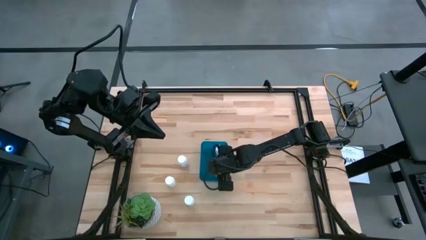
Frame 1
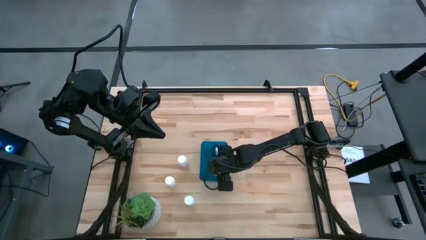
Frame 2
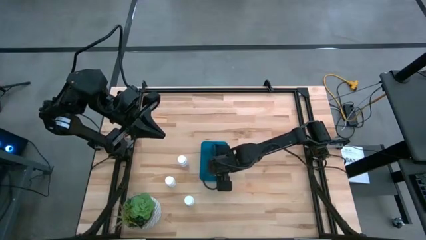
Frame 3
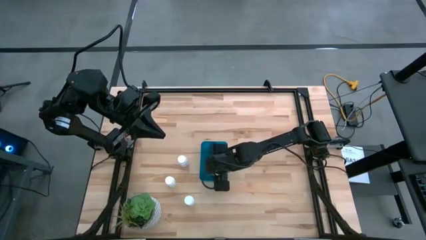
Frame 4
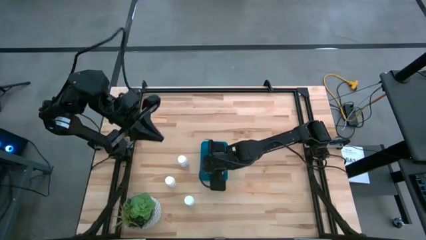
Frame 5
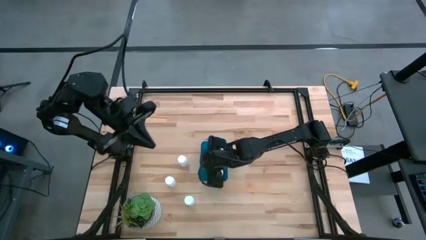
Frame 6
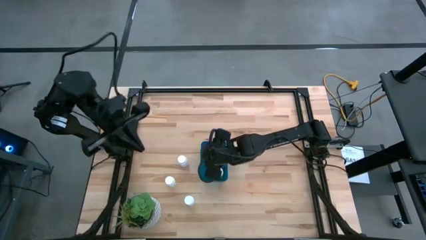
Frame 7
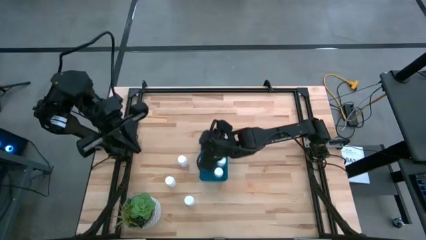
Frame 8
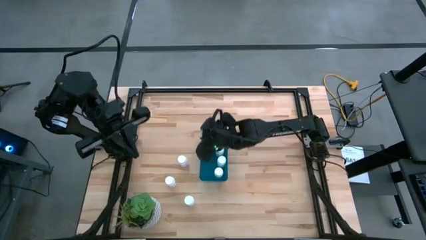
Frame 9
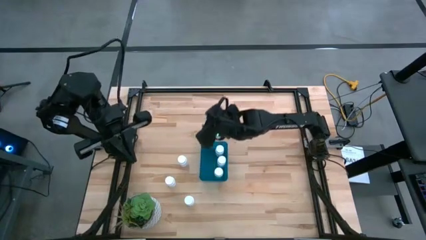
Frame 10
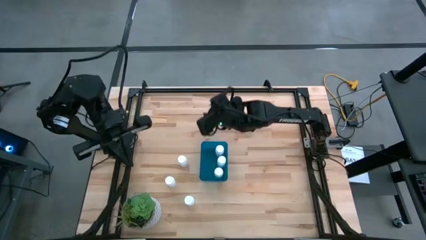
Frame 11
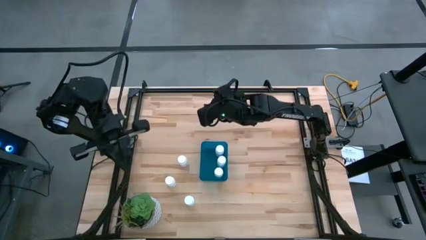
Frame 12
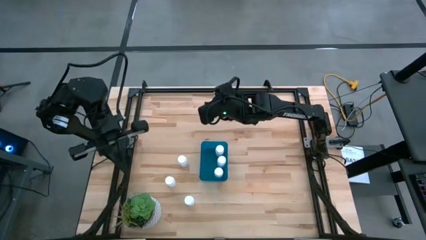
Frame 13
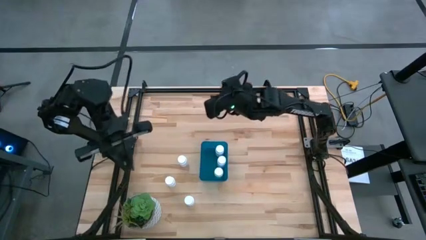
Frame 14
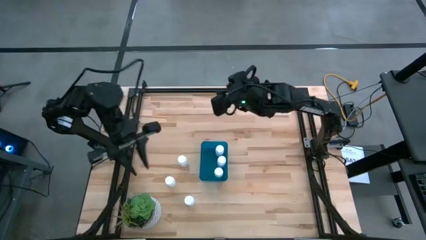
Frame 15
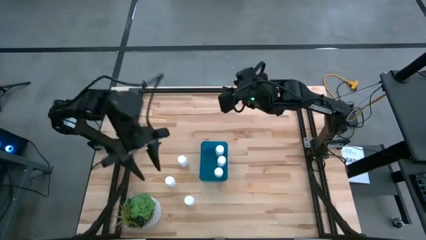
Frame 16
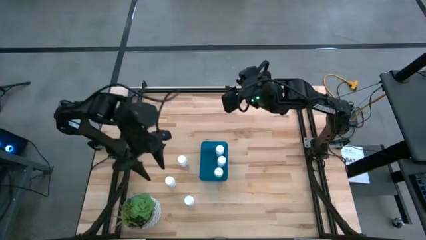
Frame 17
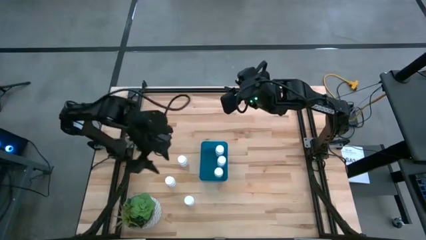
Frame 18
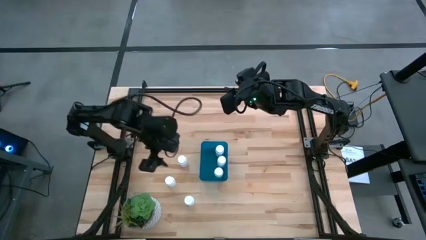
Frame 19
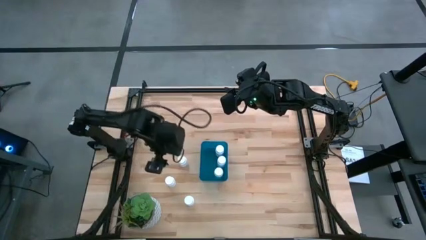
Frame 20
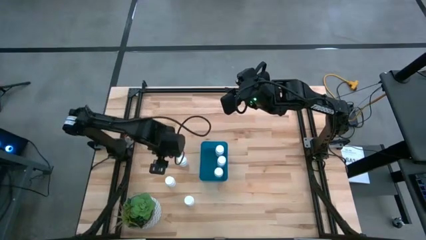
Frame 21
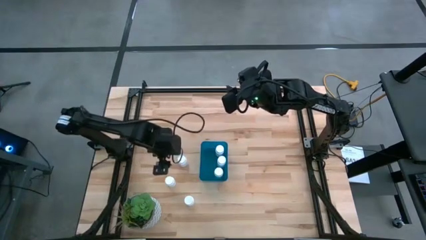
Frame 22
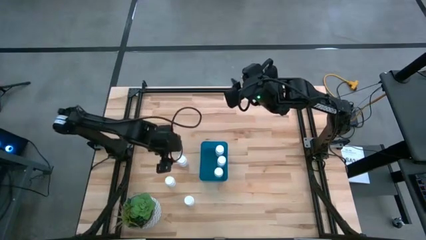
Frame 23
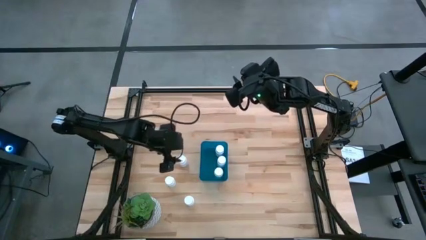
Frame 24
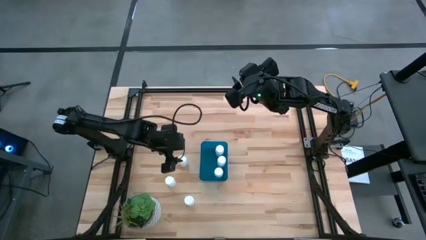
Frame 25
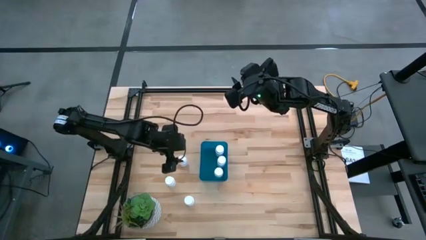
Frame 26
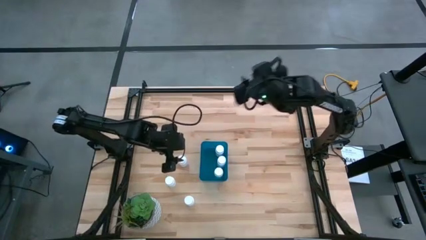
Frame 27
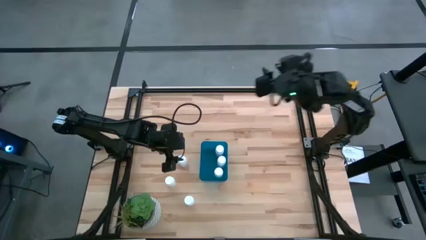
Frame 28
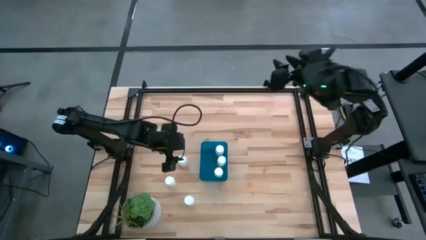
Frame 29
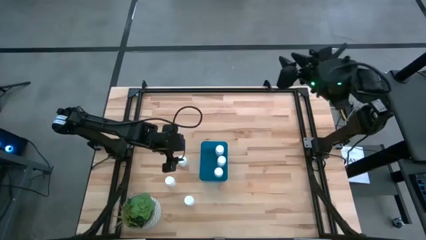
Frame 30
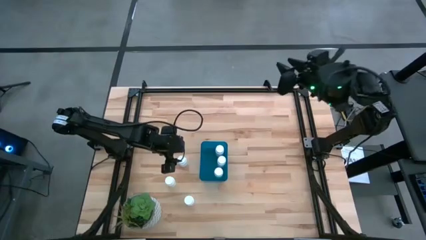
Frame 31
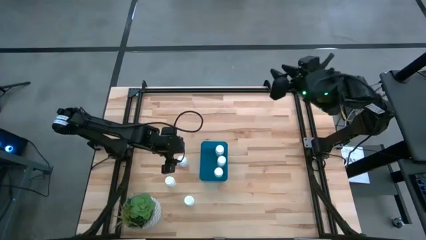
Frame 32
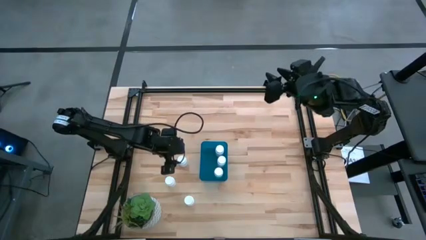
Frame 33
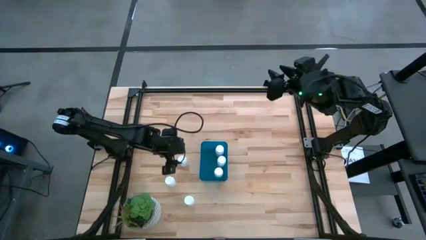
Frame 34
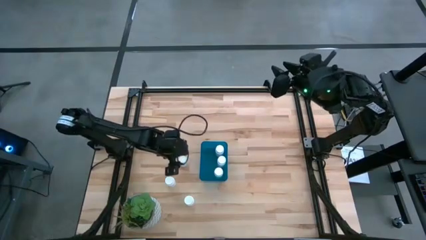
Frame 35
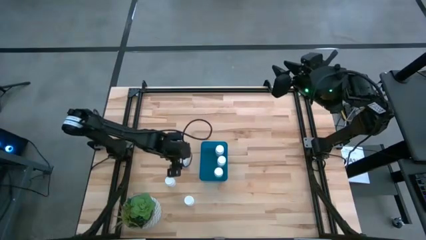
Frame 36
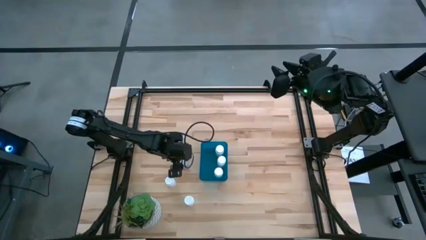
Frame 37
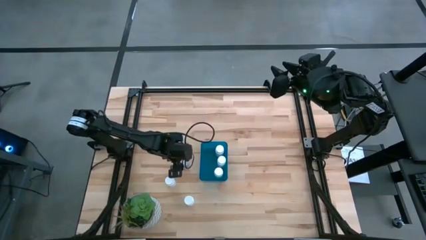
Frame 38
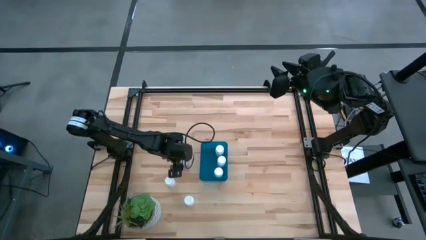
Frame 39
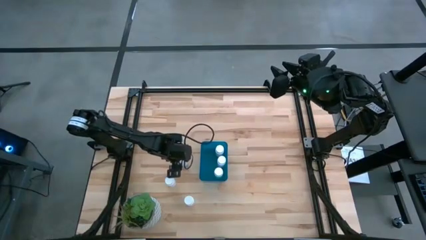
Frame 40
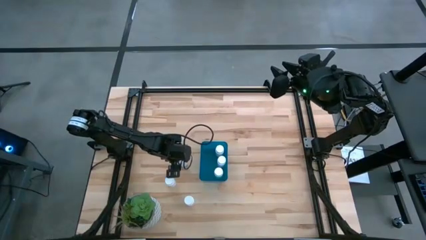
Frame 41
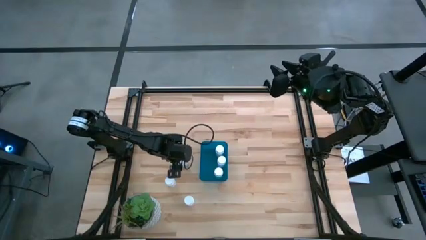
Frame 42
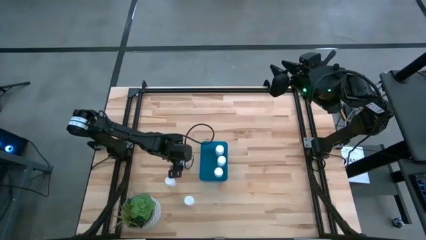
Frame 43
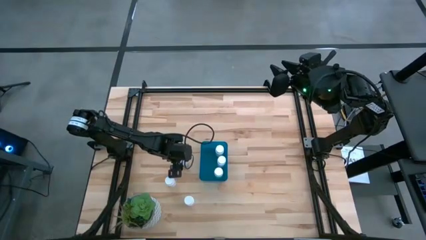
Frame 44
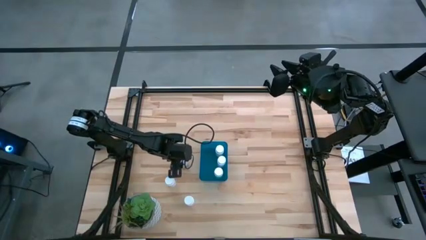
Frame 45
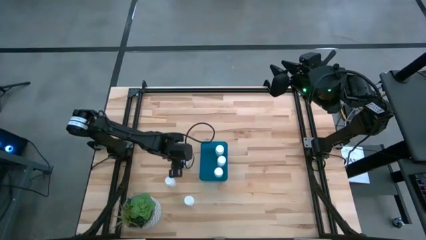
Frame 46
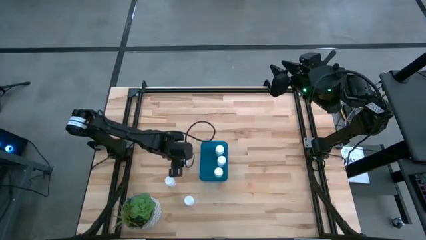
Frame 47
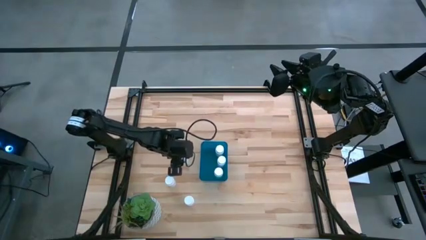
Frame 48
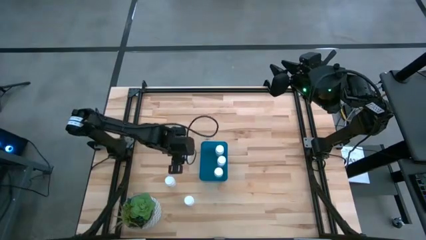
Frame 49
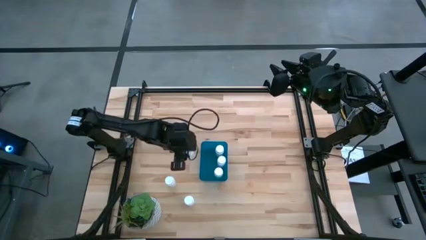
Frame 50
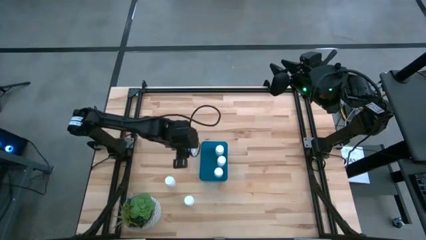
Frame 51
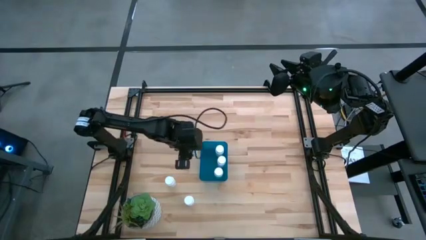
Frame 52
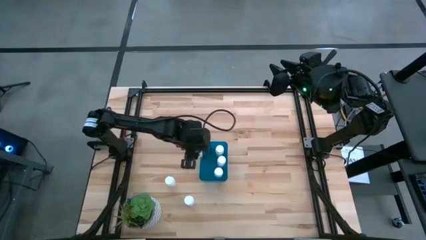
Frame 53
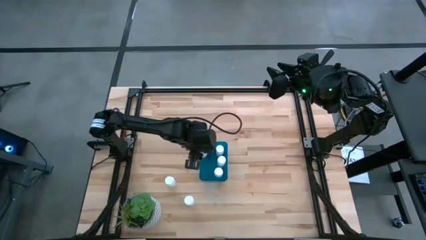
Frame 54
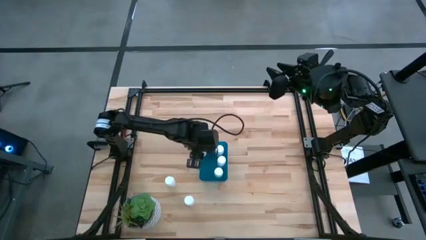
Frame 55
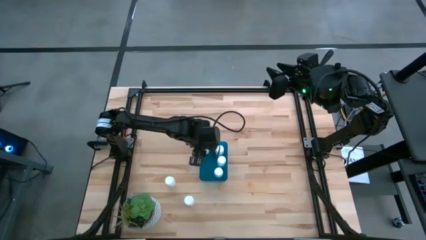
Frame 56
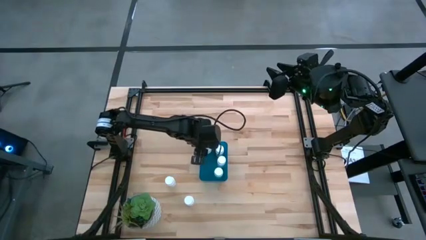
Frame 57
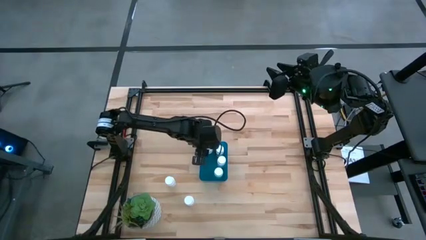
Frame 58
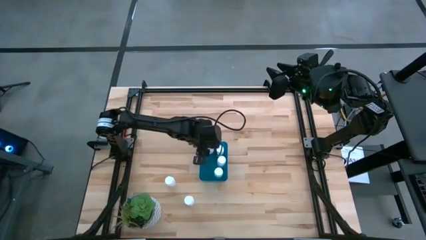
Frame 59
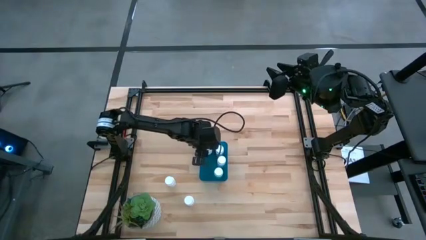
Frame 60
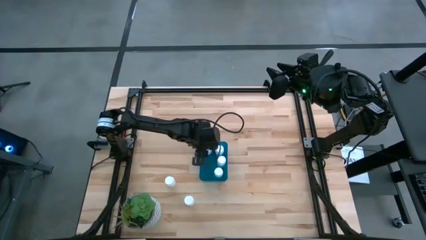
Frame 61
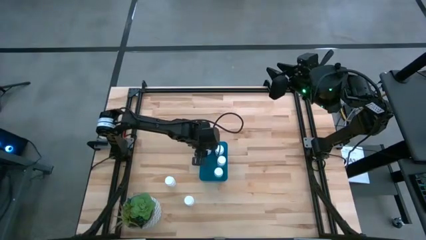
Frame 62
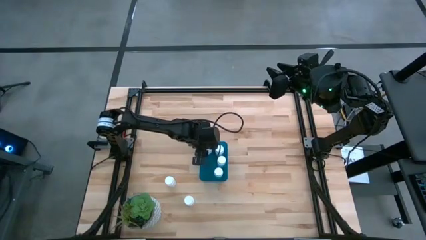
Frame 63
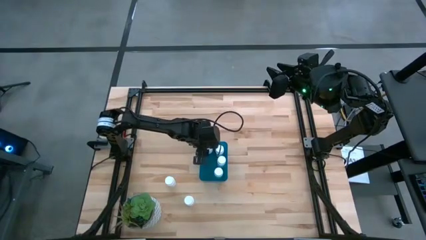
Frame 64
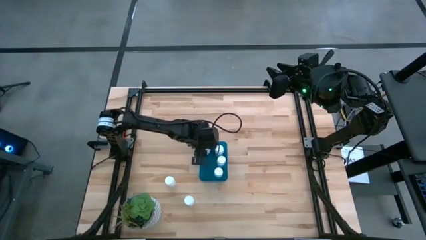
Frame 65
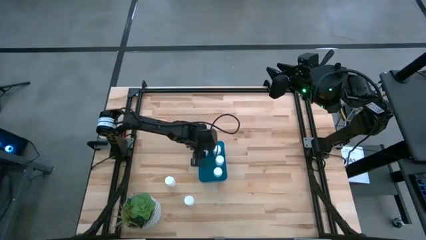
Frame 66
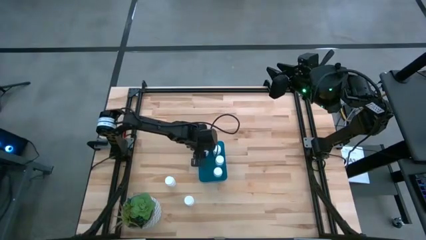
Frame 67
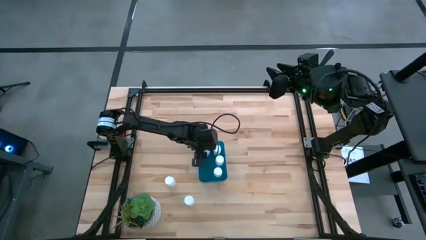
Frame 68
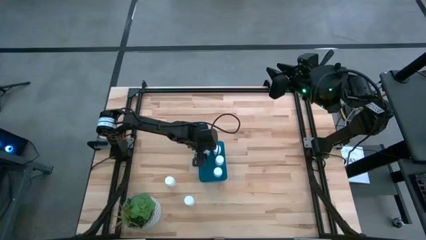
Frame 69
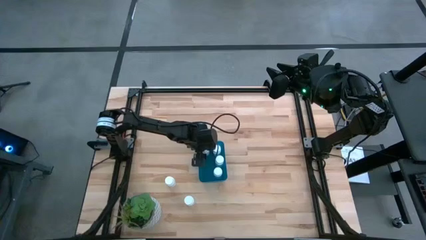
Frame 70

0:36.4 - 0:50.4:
Task: Pick and place pill bottles into a basket
Put the top pill bottle into the bin
